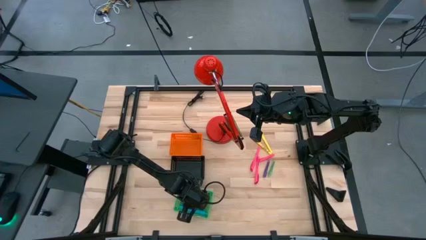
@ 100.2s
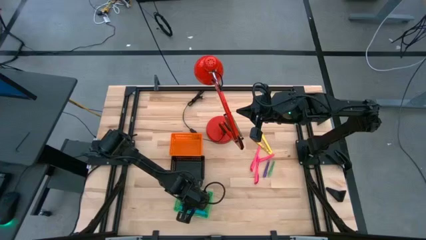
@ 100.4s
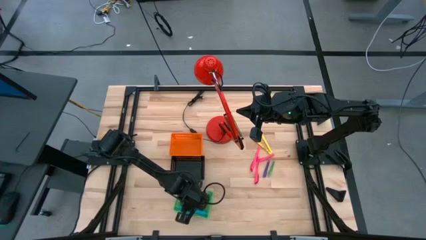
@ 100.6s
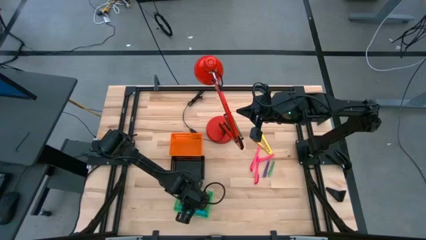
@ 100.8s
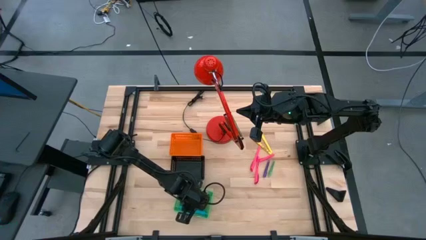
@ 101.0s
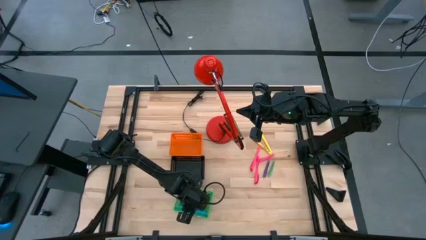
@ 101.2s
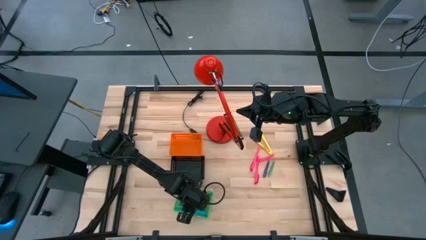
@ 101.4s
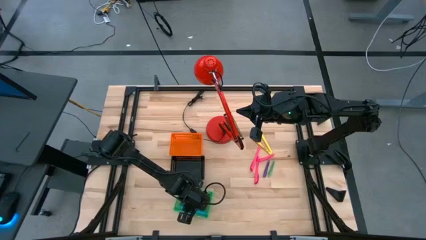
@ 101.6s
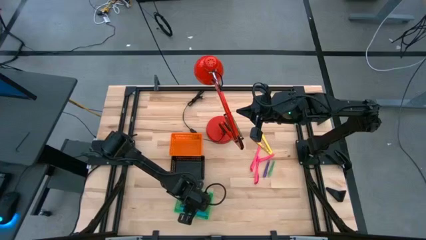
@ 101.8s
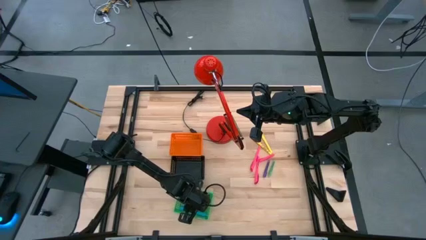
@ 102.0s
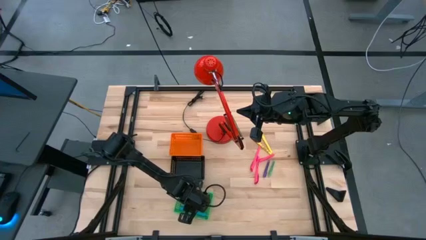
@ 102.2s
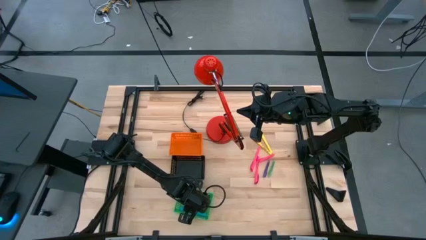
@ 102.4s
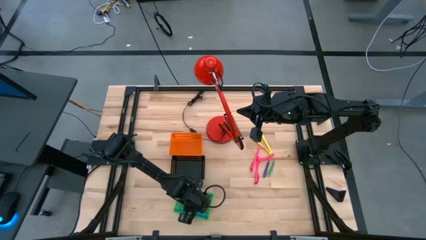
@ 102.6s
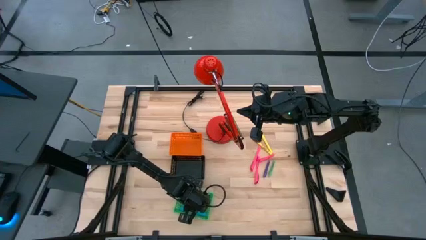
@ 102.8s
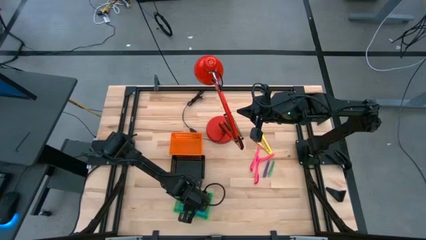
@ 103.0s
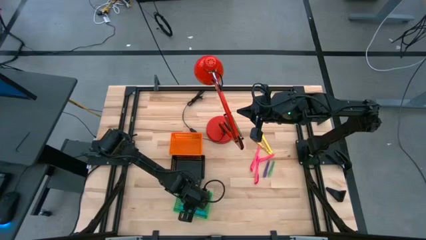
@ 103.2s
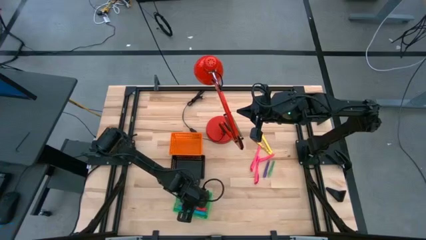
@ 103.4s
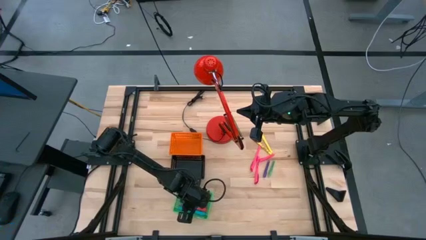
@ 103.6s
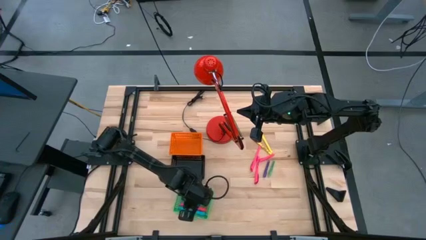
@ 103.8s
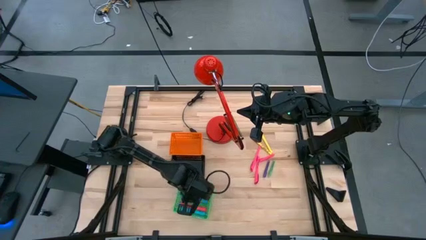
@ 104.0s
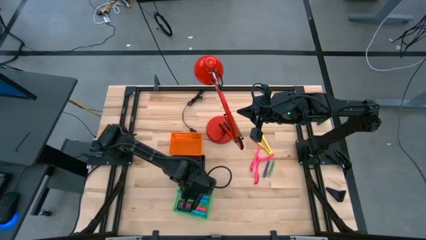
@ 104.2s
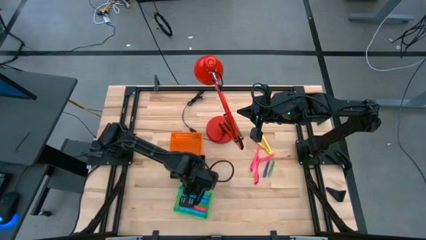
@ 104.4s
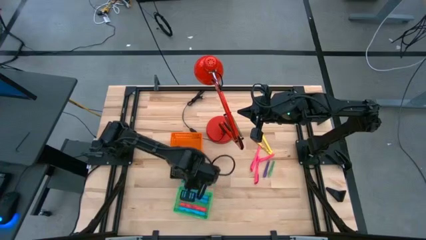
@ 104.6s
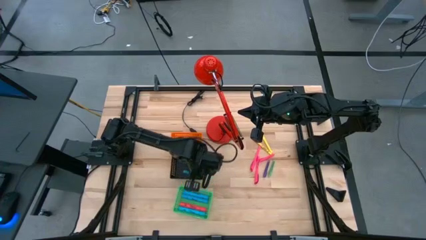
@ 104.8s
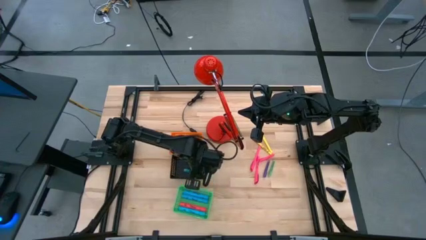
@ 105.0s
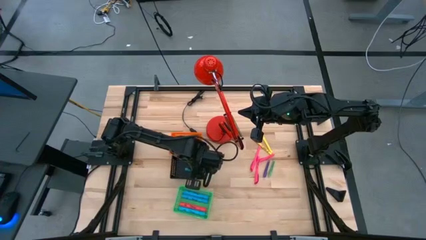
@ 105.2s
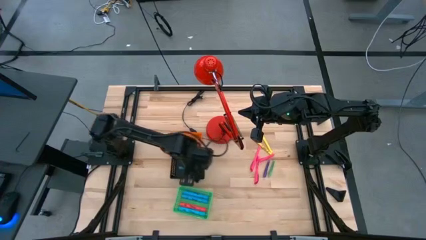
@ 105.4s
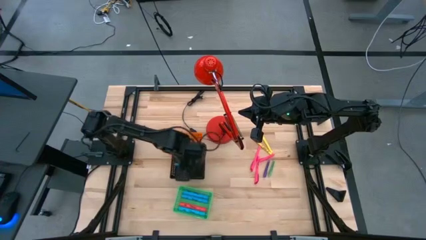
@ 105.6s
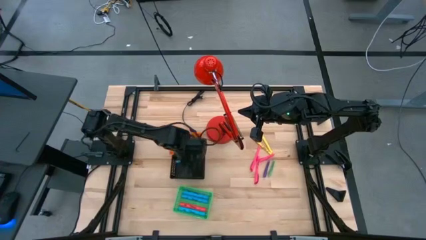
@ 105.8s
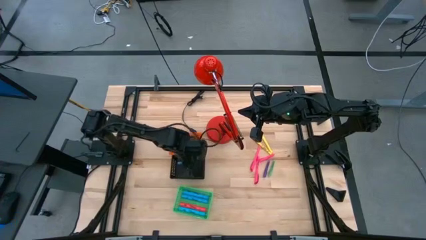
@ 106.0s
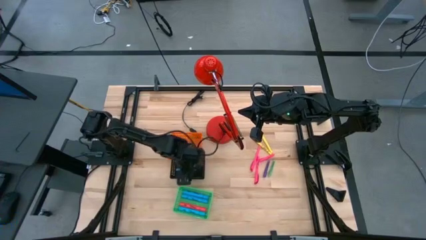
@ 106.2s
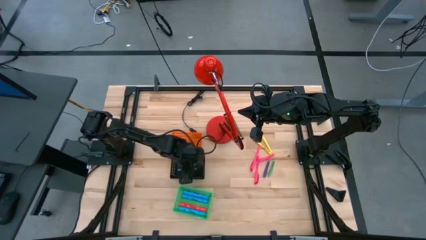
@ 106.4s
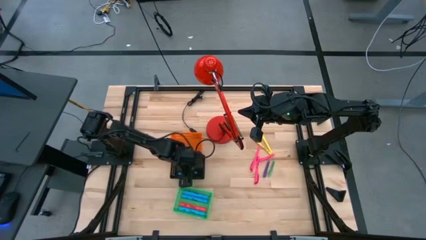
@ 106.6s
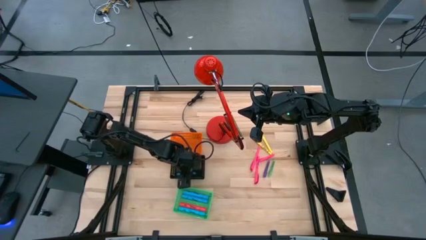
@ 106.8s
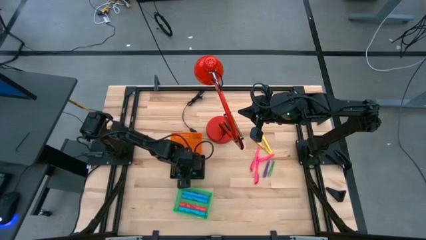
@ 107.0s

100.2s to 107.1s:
Task: Pick & Place Markers
Put the blue pen into the black bin

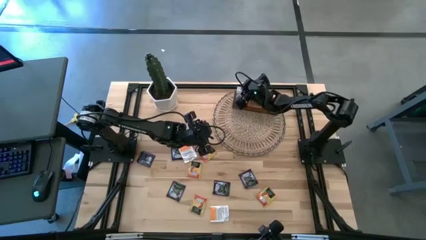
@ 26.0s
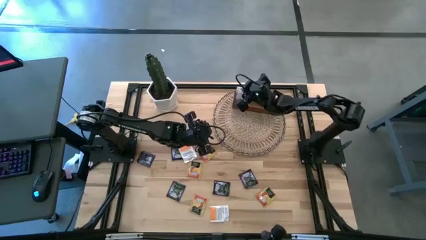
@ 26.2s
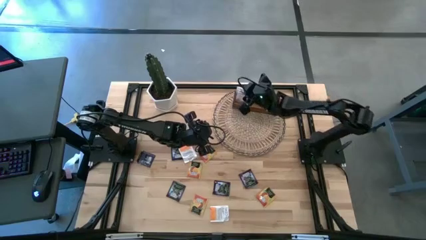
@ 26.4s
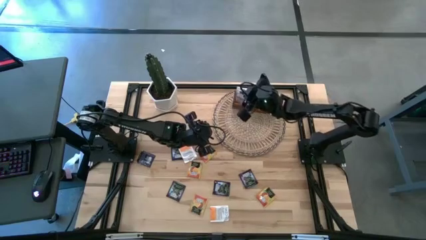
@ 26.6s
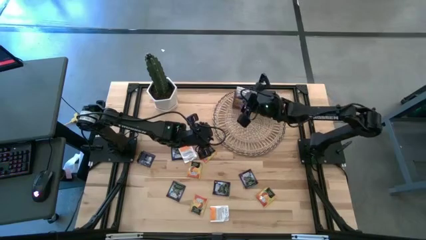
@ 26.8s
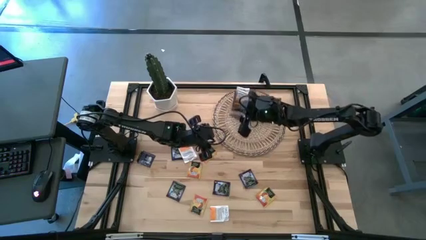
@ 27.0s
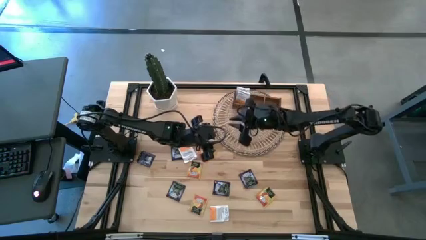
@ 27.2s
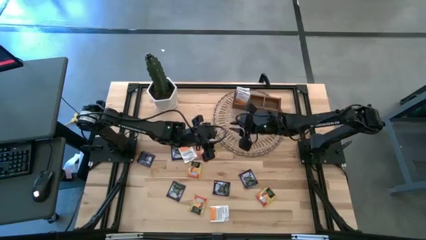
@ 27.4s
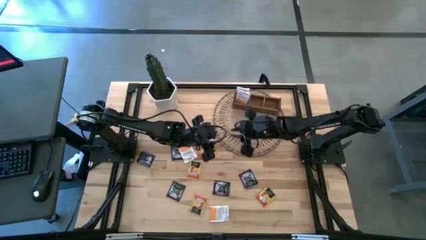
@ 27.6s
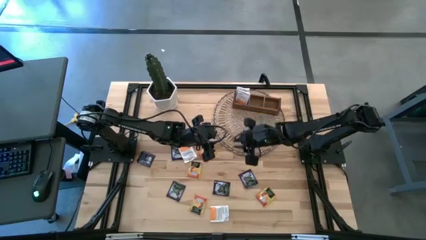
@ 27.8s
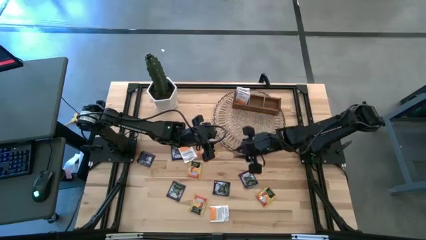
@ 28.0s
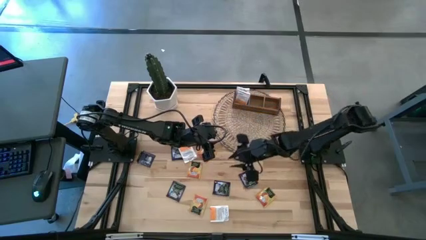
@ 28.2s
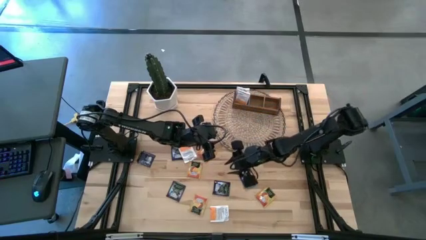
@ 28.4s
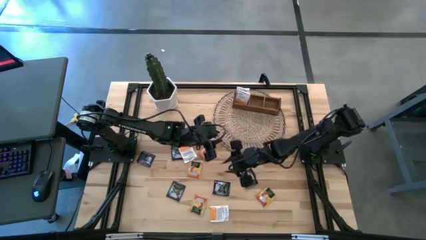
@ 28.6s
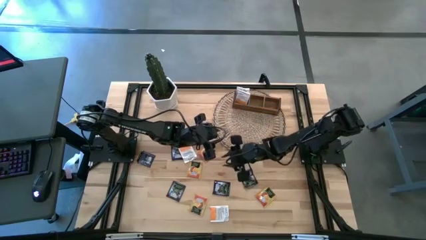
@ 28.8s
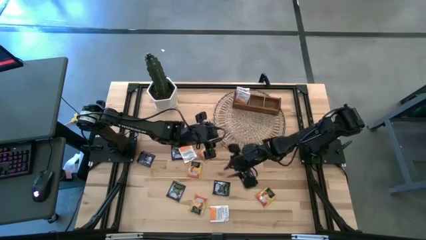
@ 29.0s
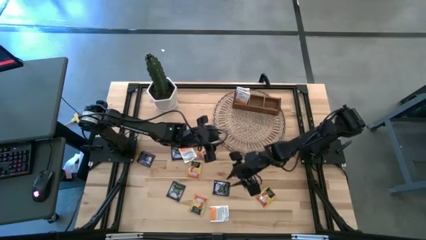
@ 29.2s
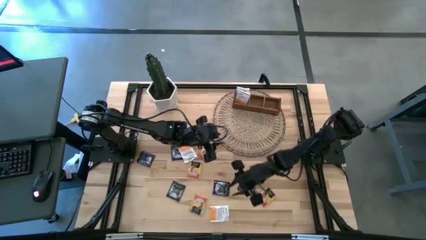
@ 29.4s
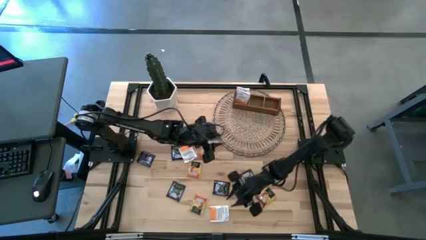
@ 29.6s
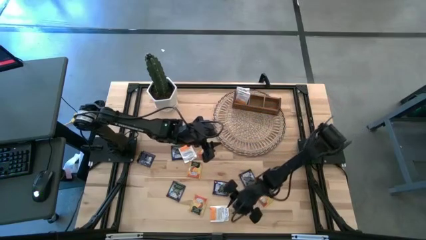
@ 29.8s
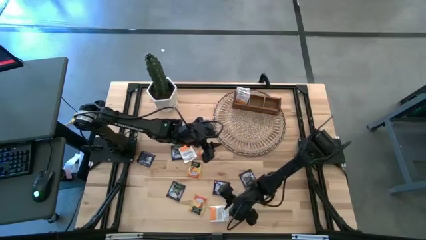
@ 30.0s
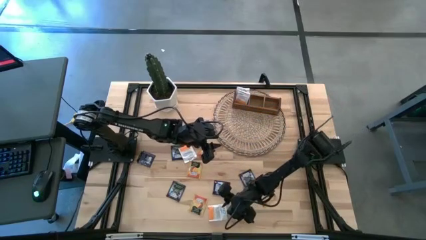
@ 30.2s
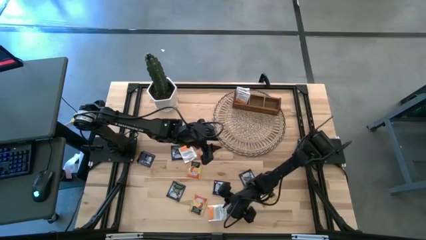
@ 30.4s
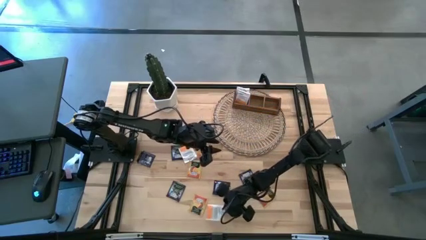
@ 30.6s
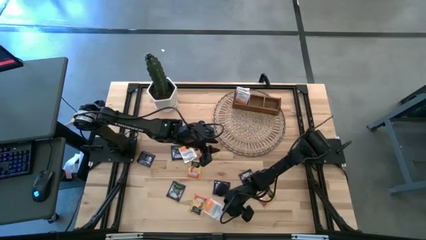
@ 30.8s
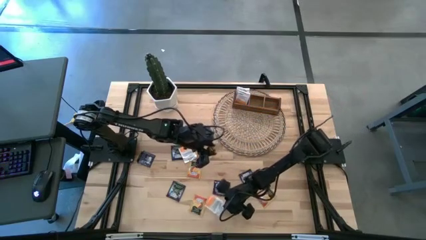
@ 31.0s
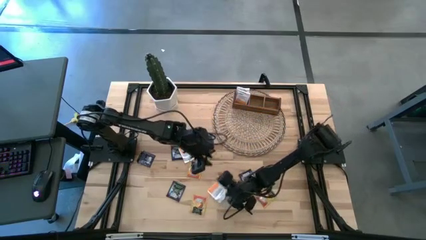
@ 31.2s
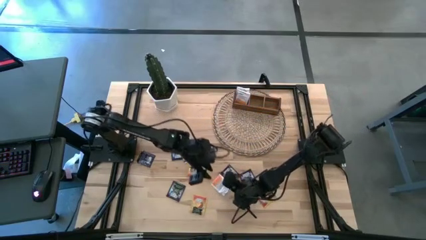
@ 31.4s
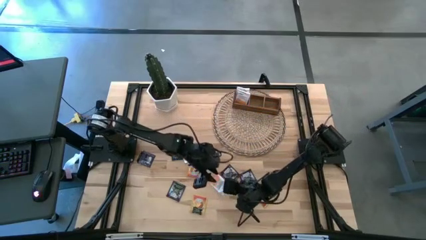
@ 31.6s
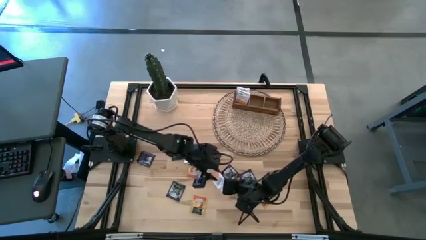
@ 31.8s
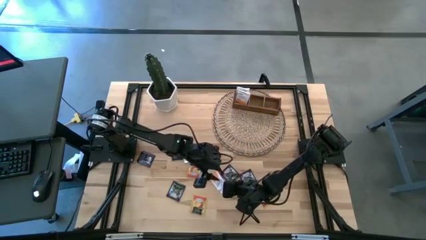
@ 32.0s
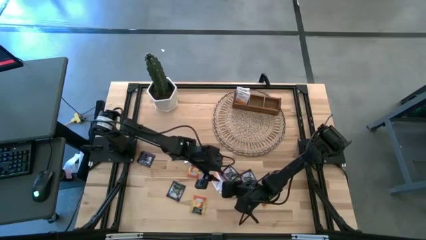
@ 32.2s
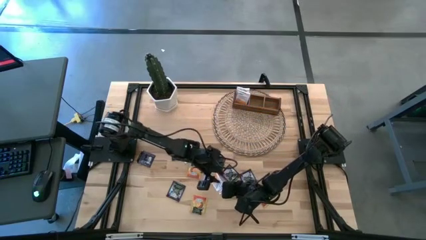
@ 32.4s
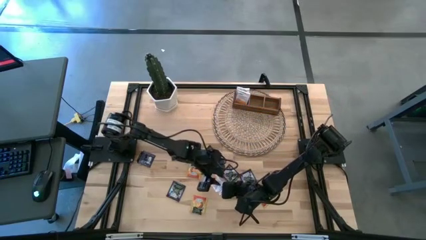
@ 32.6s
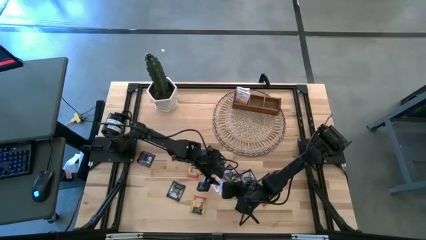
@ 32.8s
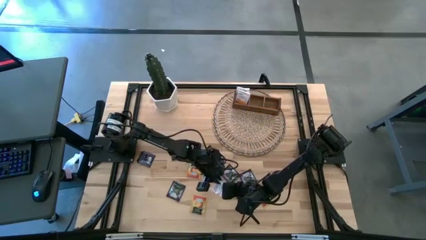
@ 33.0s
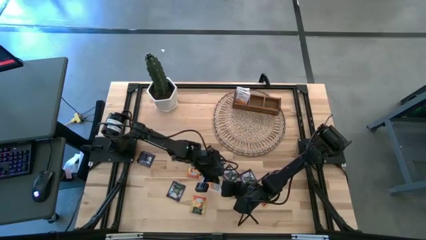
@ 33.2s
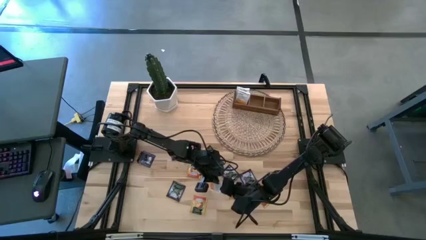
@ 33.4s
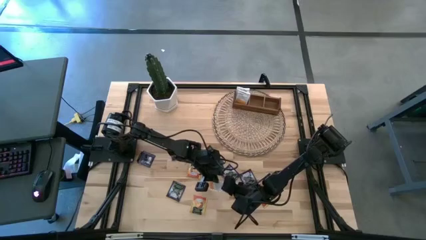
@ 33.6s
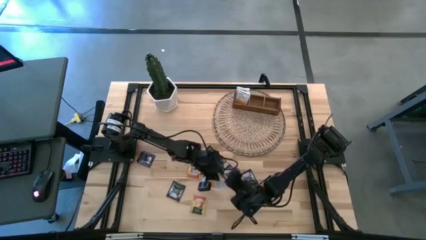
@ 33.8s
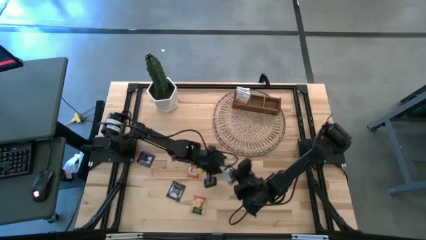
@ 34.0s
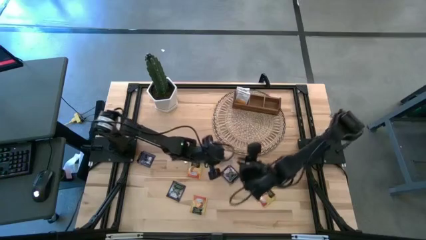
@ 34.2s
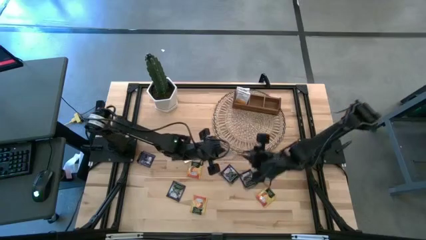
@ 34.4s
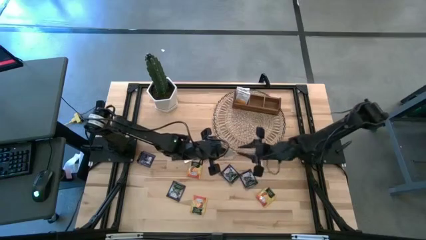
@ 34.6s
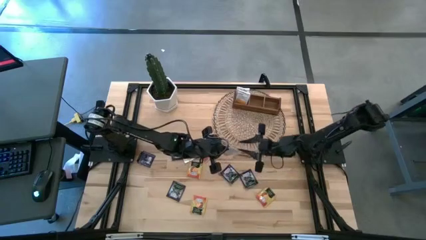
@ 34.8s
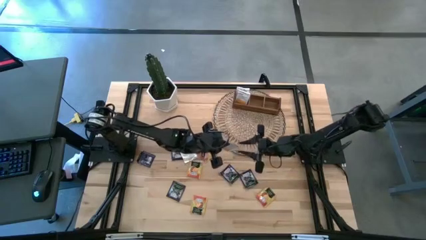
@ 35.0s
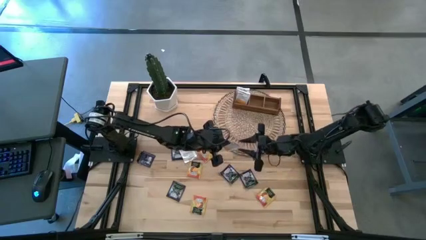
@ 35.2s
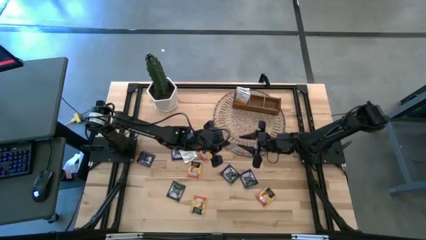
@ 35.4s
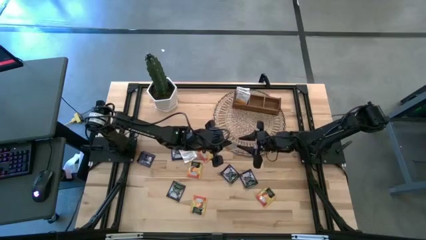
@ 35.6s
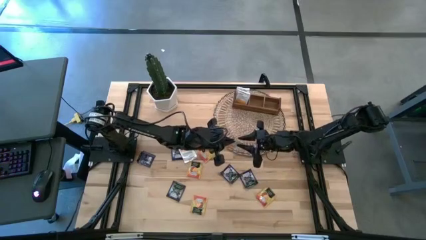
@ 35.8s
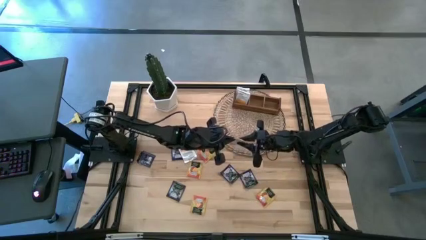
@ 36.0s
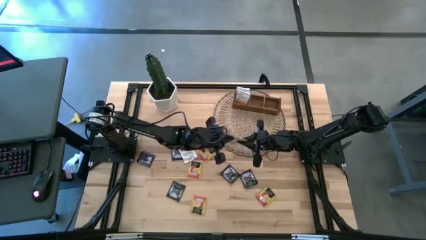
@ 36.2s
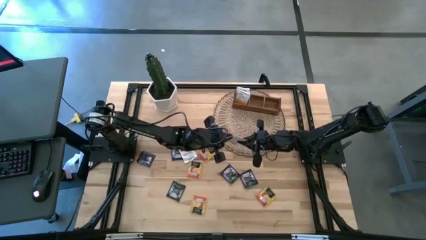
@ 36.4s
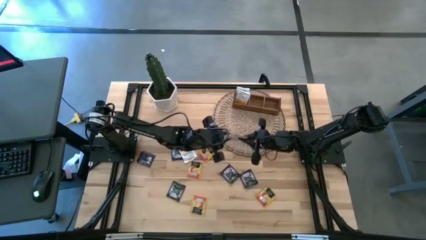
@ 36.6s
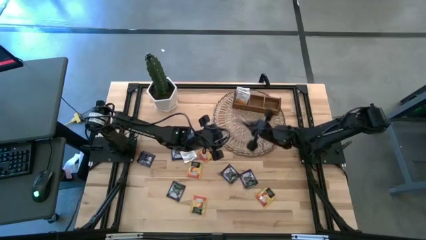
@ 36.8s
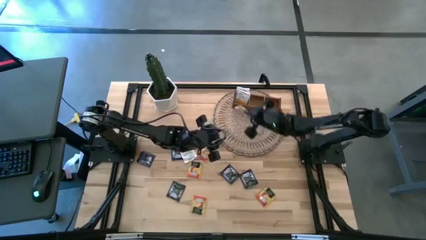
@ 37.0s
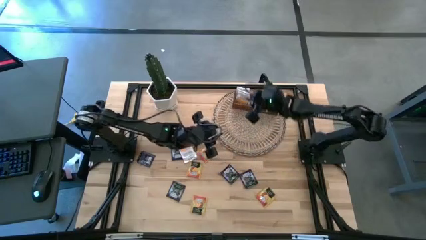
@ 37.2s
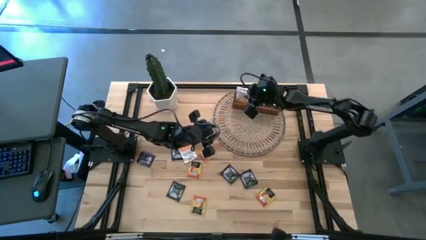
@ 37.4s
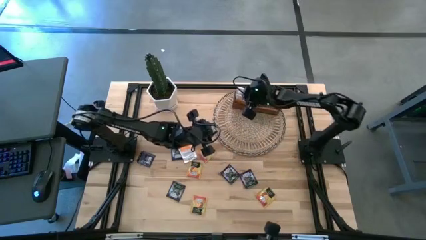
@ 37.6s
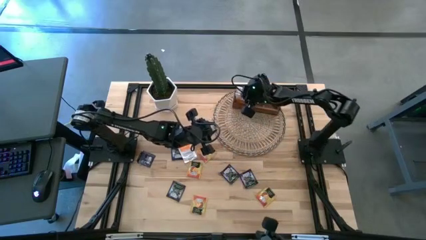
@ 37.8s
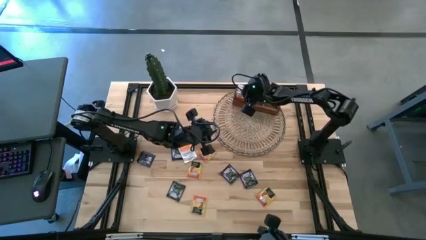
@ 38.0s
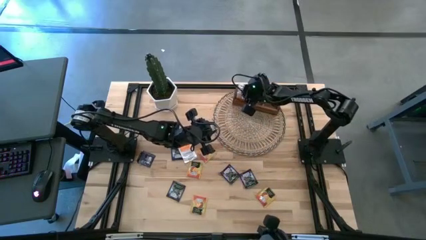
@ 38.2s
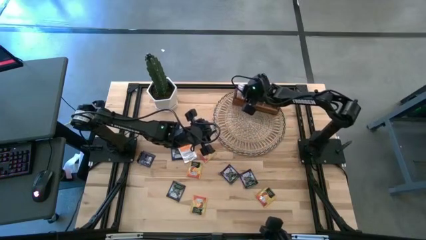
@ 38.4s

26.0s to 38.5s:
Task: Pick & Place Tea
Put the orange tea bag into the left section of the wooden organizer
